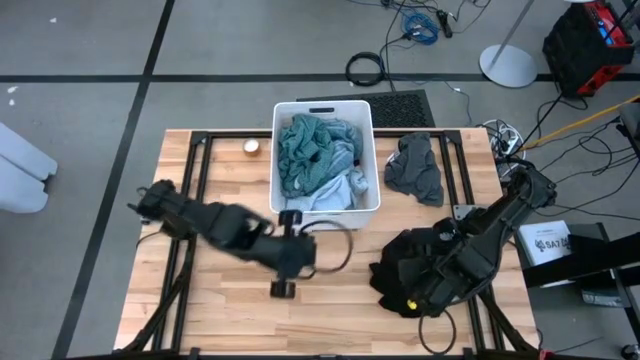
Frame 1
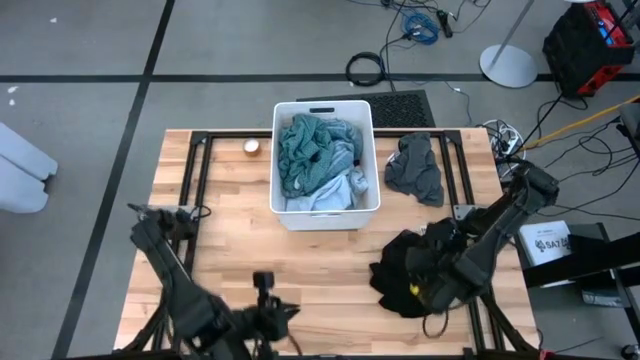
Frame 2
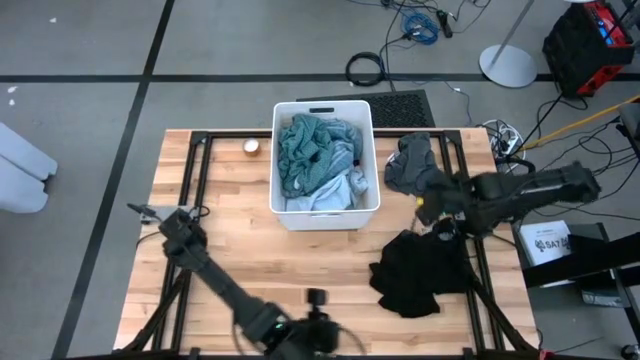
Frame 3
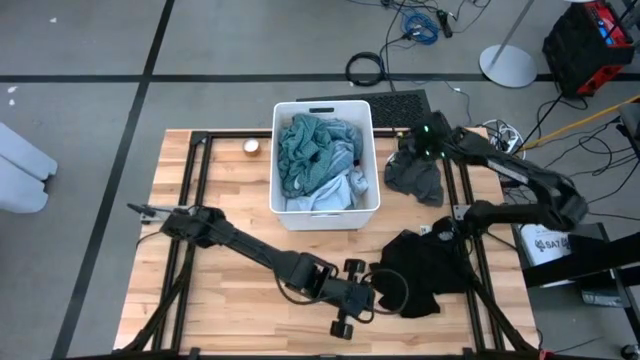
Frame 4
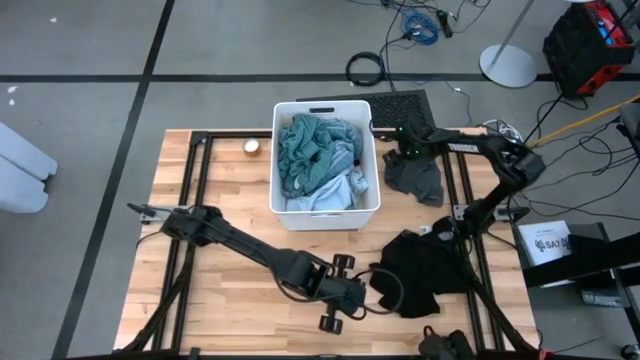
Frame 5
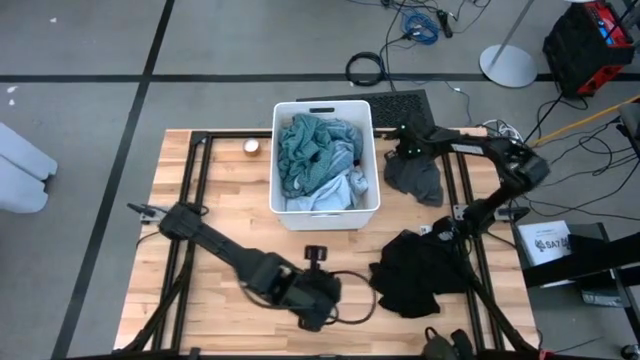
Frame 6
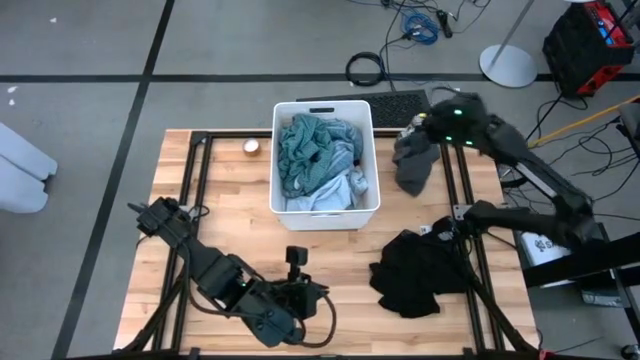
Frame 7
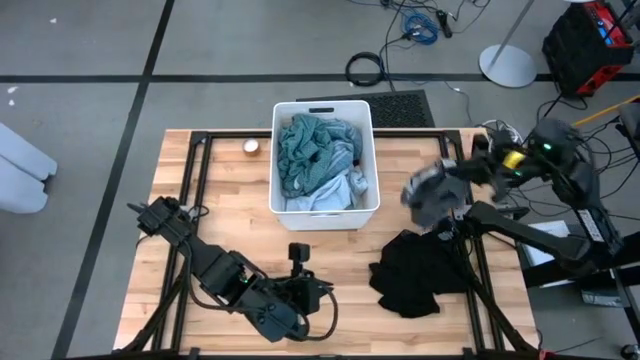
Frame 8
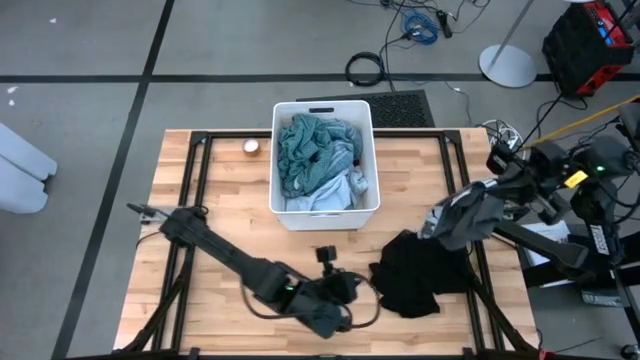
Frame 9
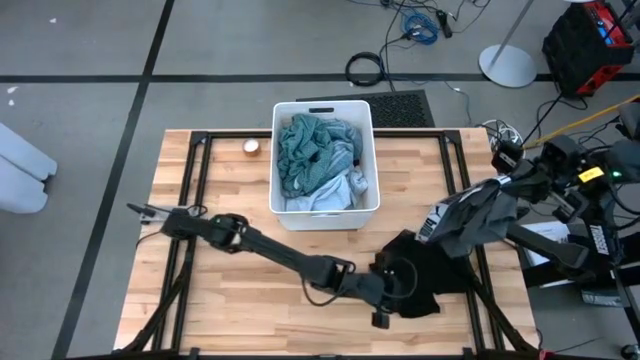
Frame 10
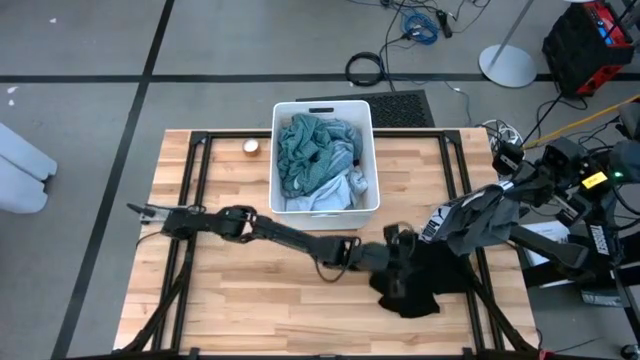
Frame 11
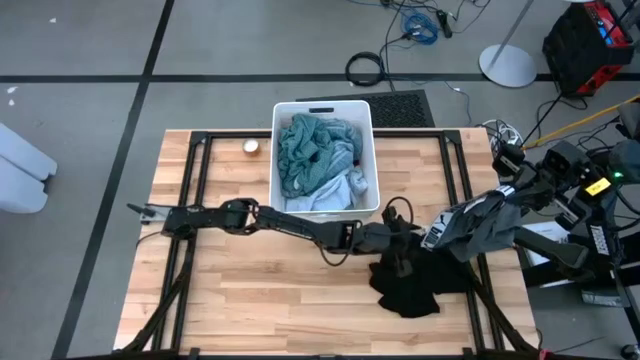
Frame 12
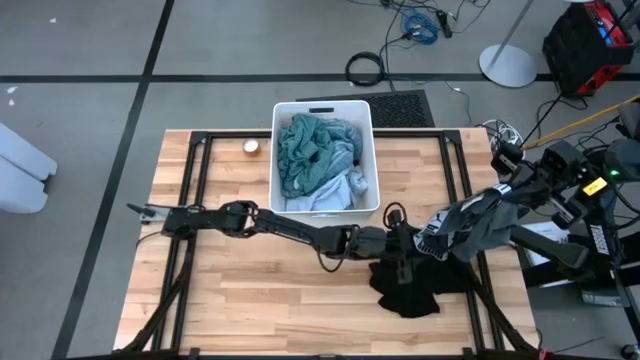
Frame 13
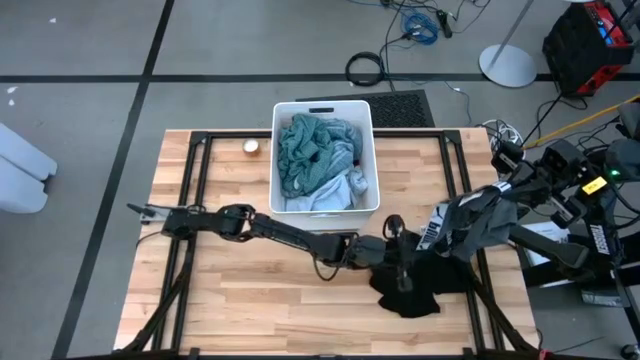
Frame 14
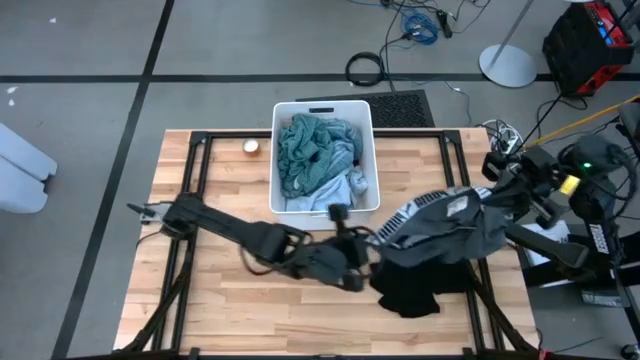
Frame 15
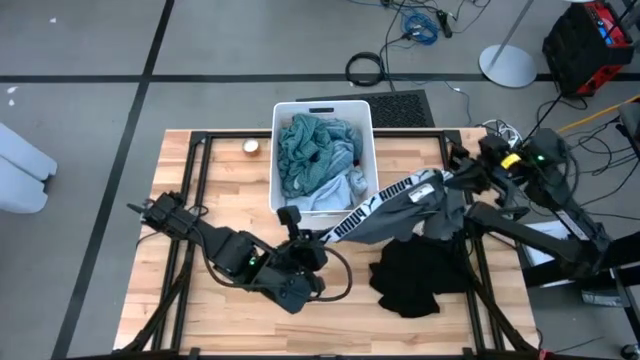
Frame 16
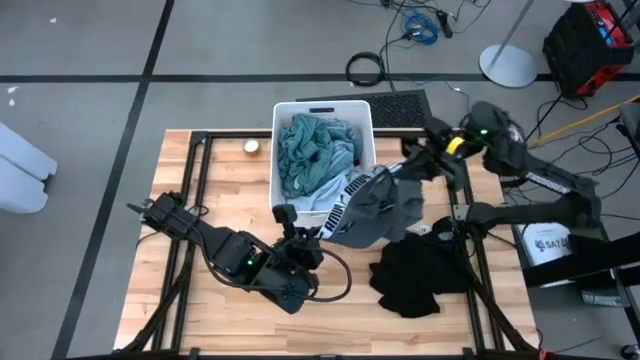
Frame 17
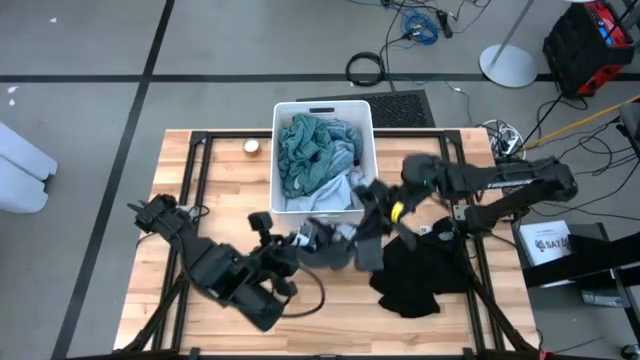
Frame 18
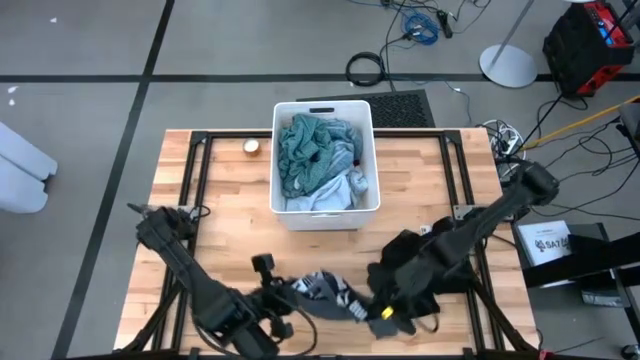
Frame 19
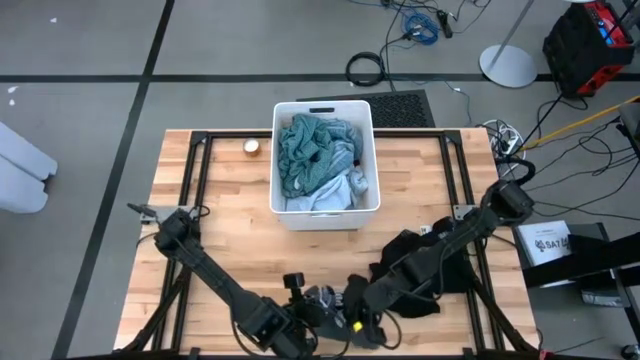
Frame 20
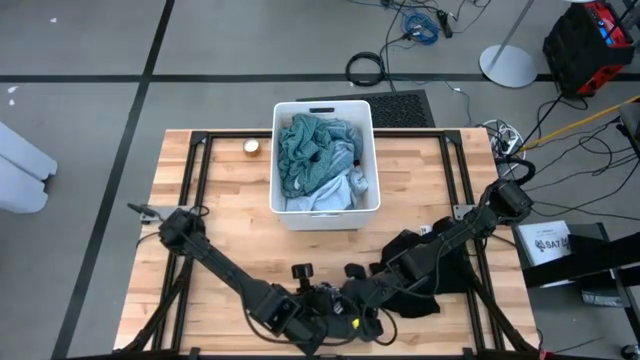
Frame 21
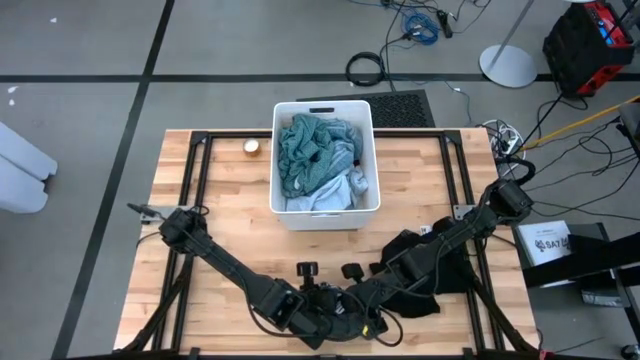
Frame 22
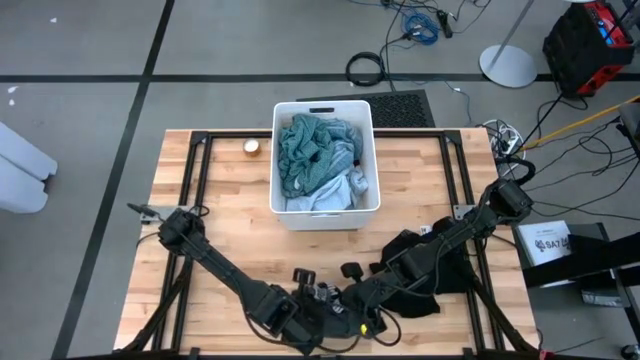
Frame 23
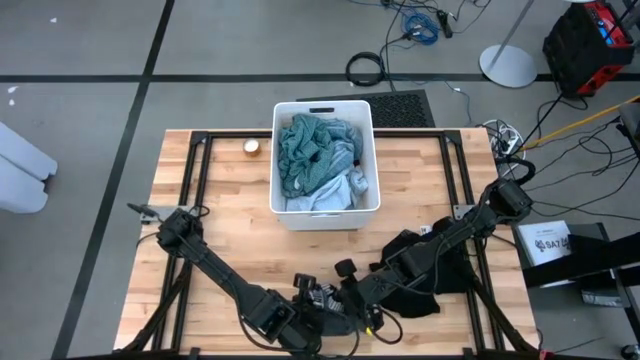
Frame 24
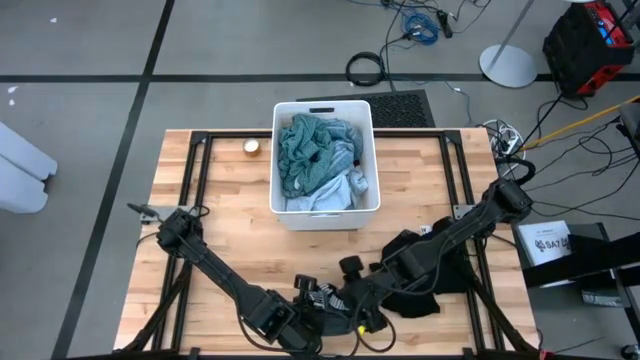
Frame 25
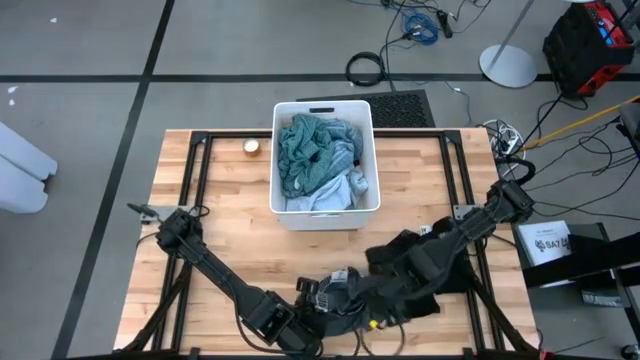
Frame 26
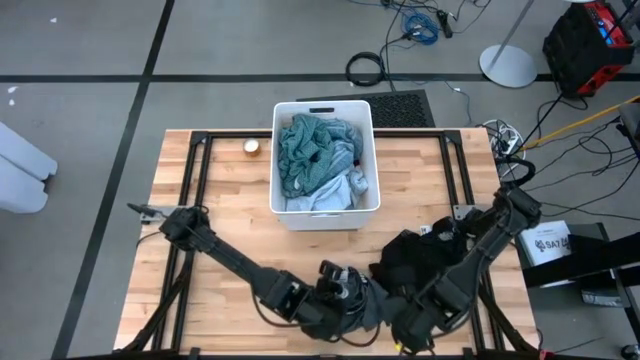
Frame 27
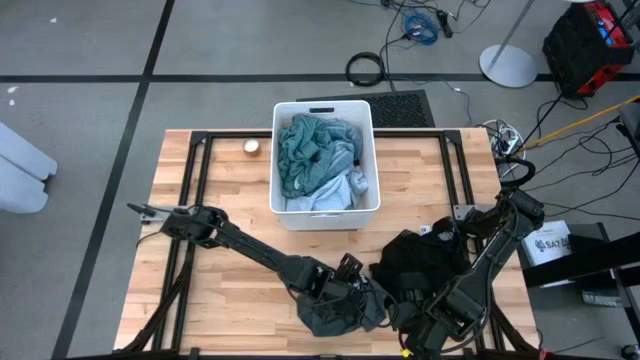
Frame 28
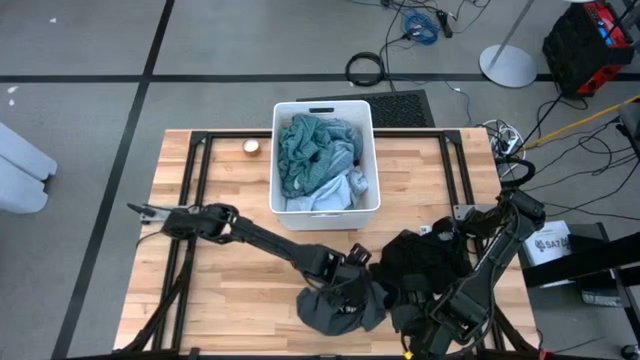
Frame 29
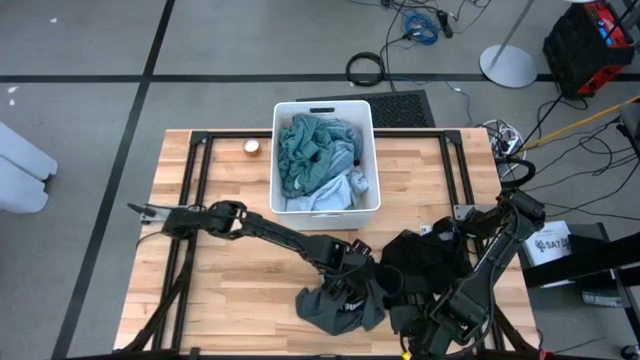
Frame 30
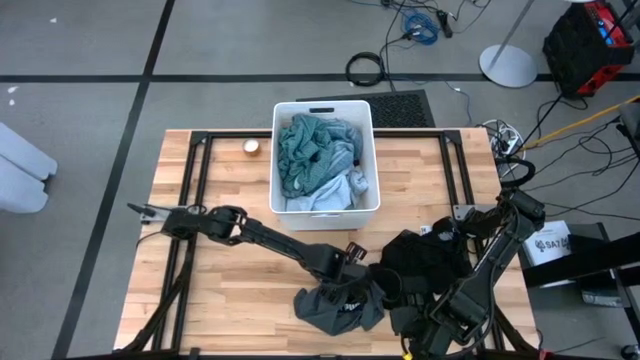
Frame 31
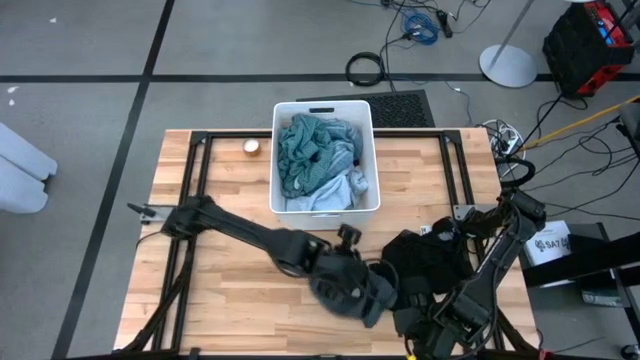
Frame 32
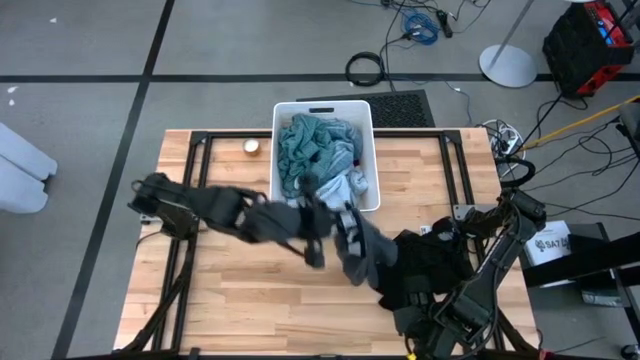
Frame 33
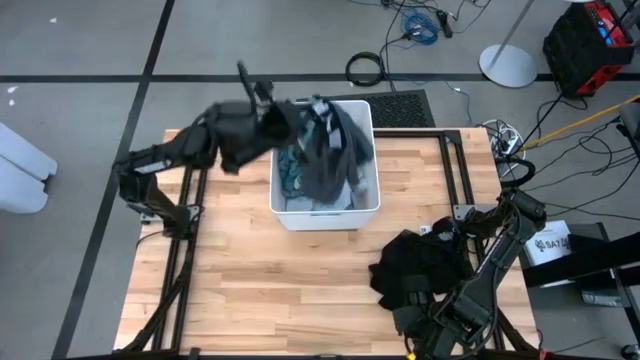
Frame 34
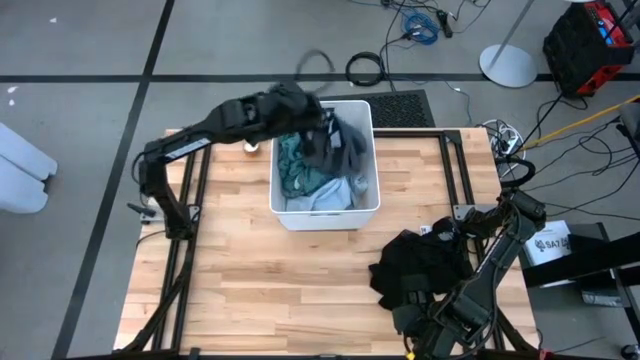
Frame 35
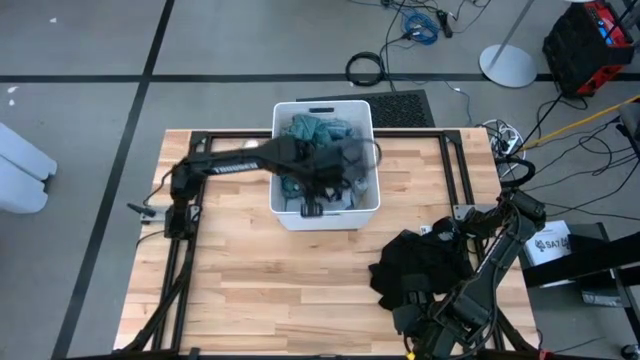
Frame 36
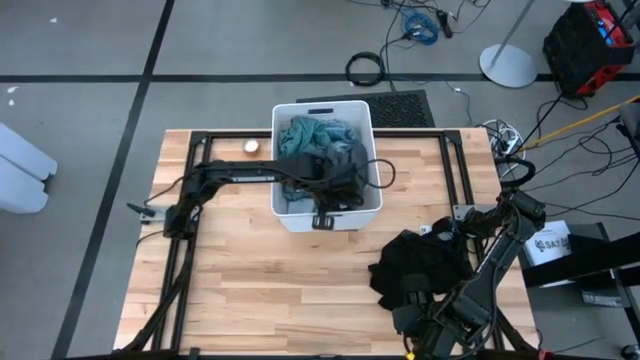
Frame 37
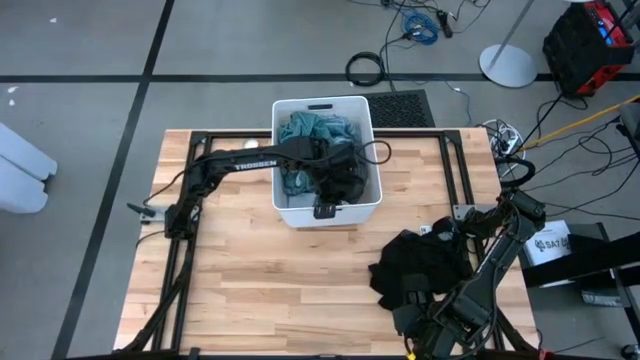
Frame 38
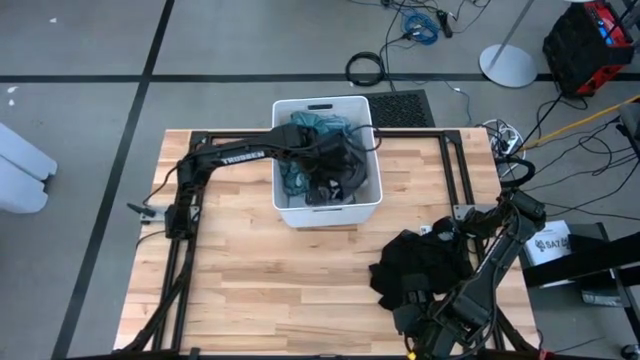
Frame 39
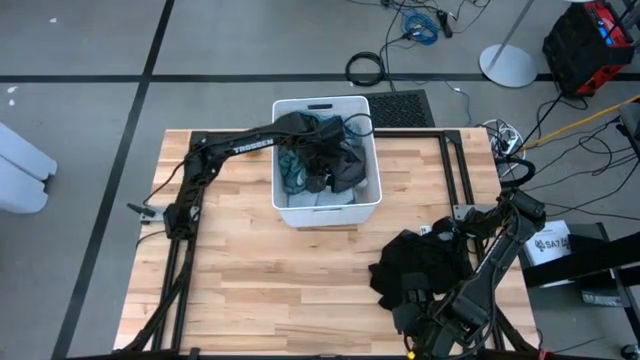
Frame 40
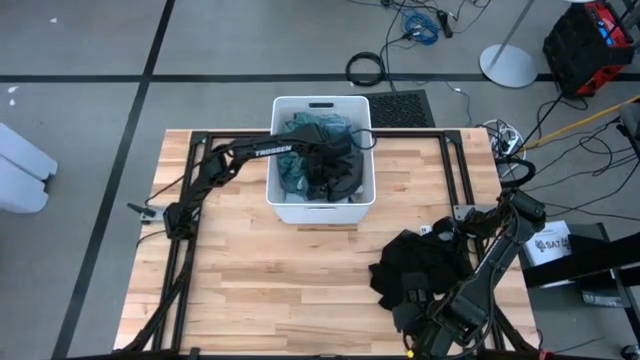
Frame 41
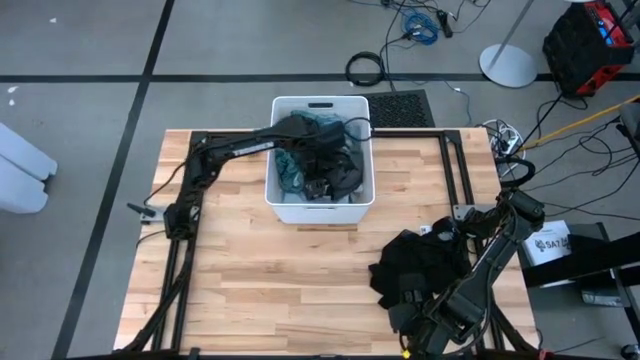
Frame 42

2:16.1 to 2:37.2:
Task: Sort clothes
Put the gray boxer into the white laundry bin
